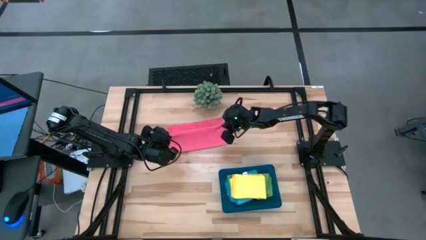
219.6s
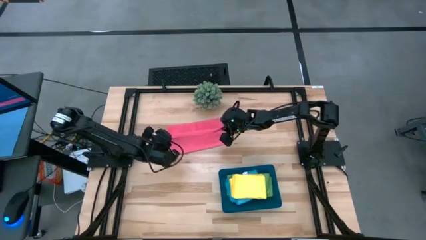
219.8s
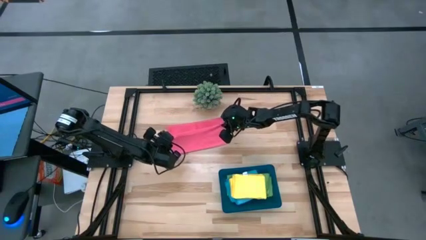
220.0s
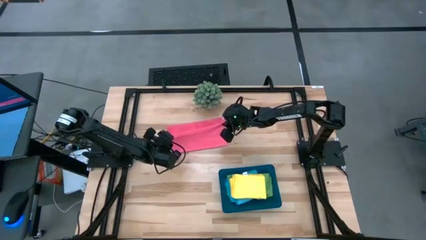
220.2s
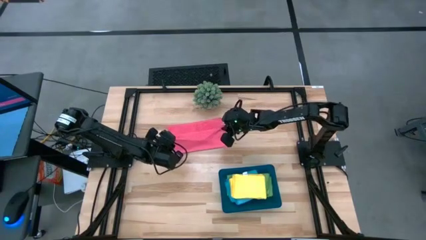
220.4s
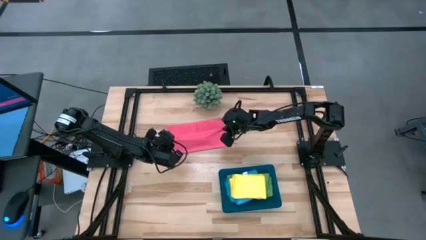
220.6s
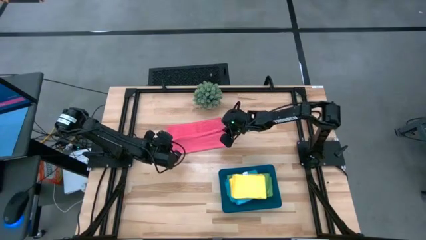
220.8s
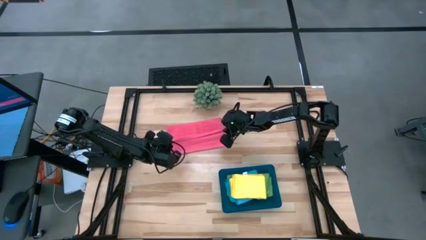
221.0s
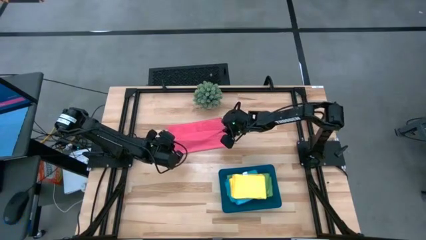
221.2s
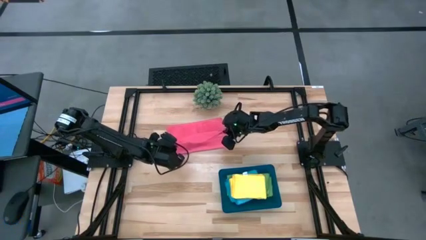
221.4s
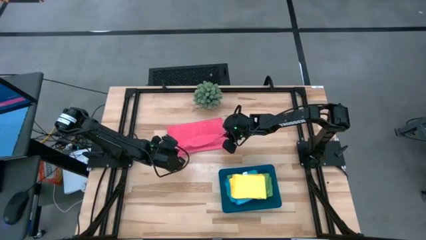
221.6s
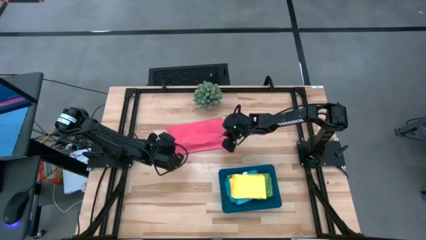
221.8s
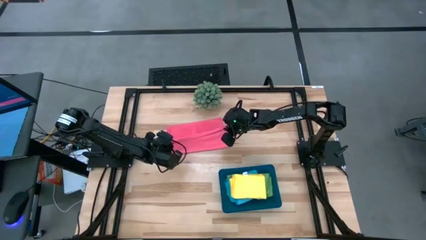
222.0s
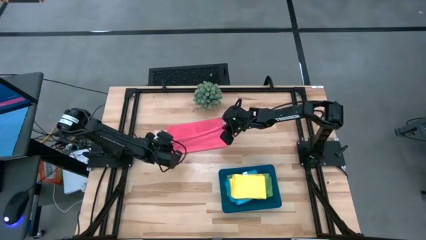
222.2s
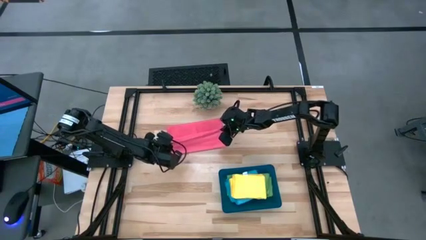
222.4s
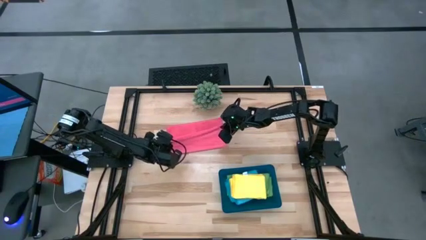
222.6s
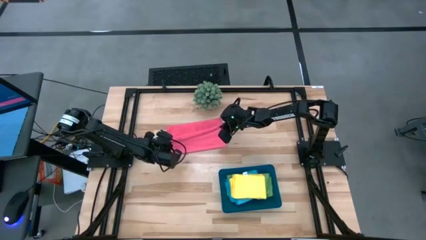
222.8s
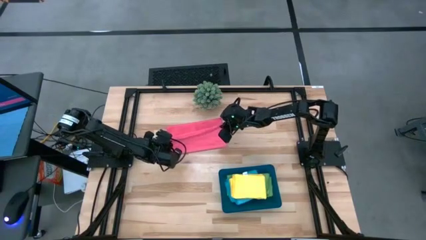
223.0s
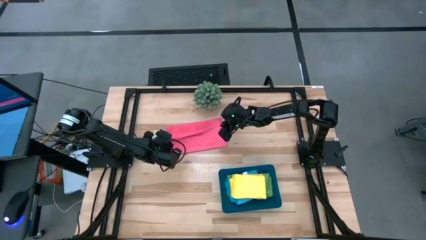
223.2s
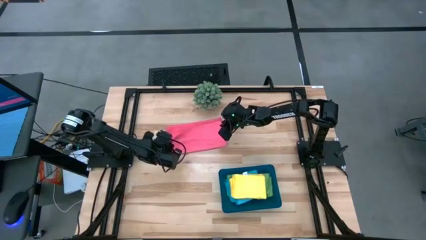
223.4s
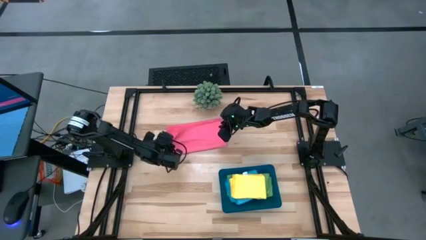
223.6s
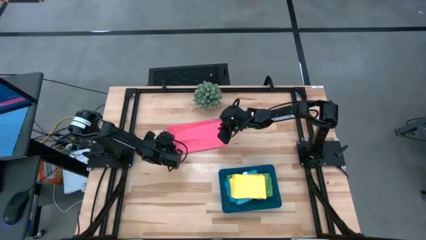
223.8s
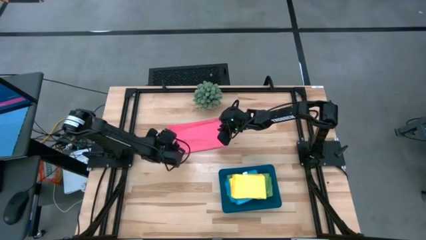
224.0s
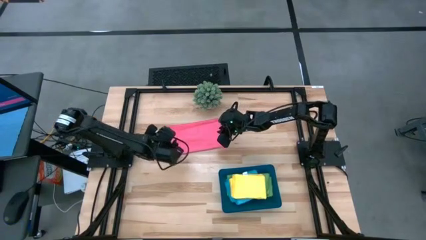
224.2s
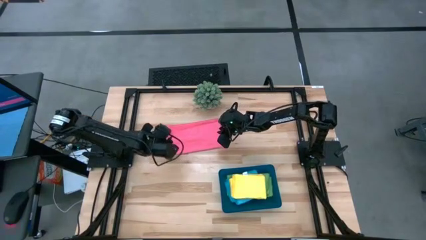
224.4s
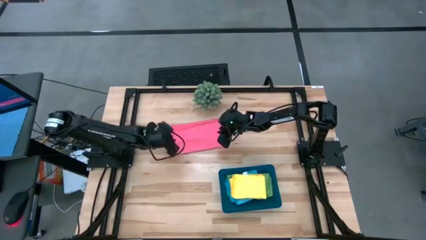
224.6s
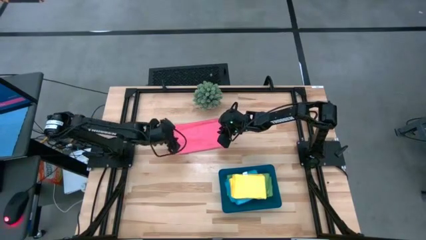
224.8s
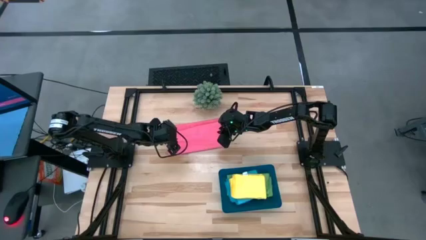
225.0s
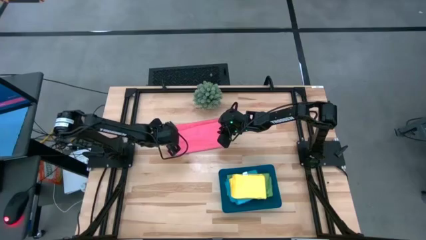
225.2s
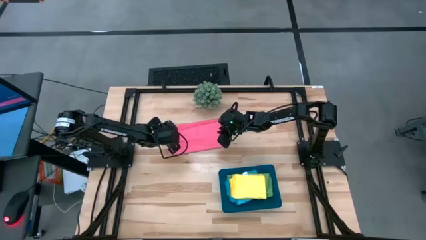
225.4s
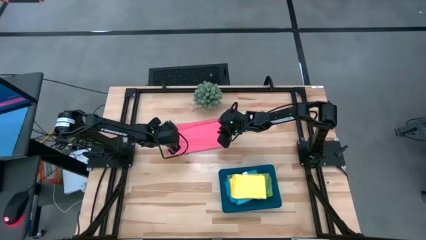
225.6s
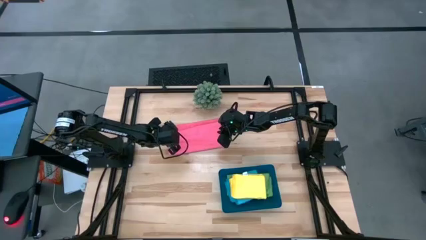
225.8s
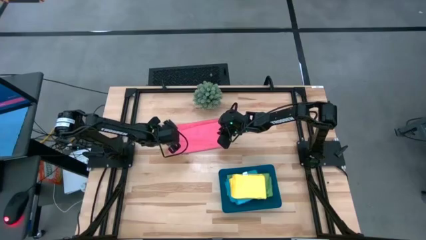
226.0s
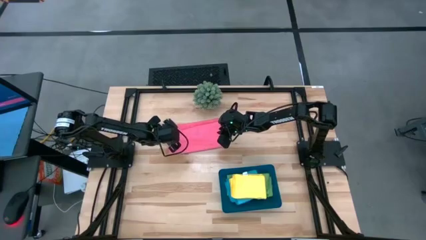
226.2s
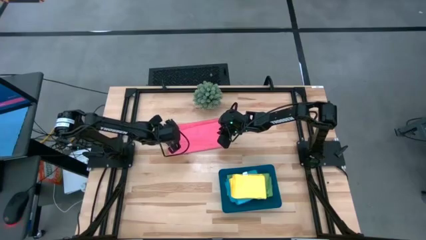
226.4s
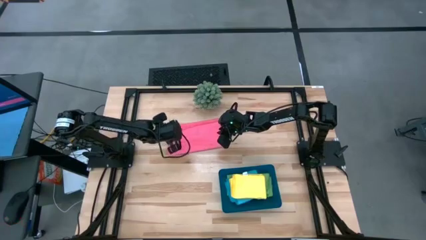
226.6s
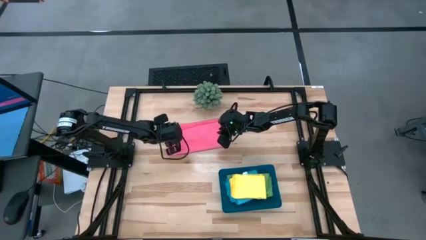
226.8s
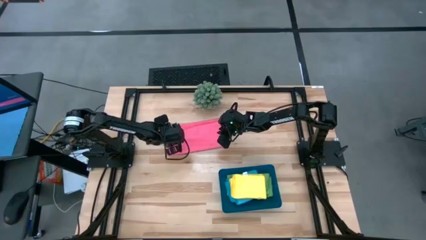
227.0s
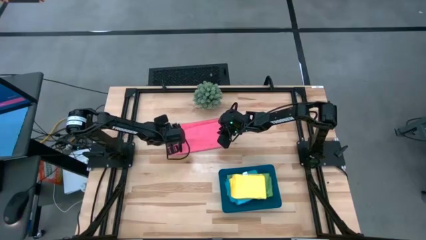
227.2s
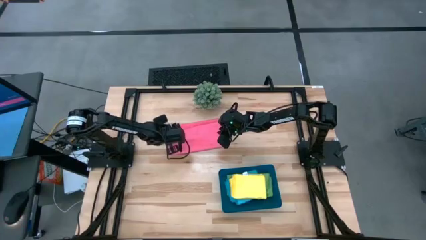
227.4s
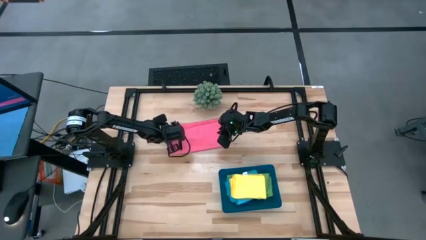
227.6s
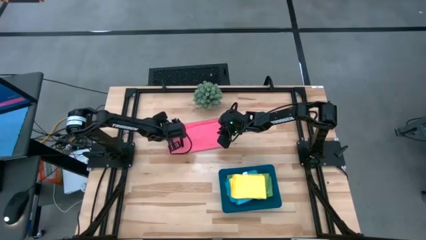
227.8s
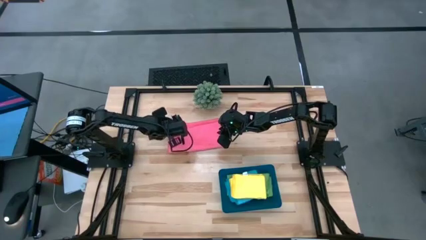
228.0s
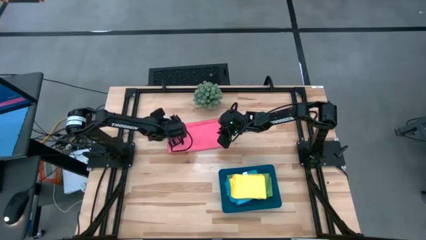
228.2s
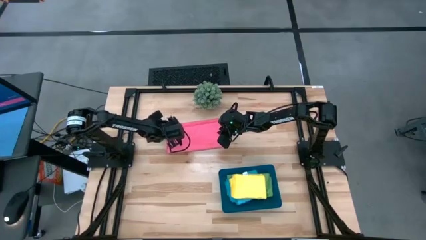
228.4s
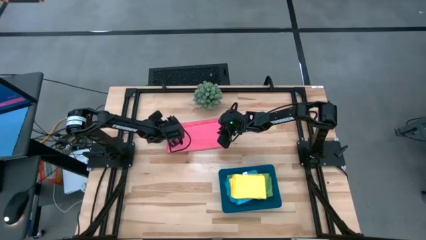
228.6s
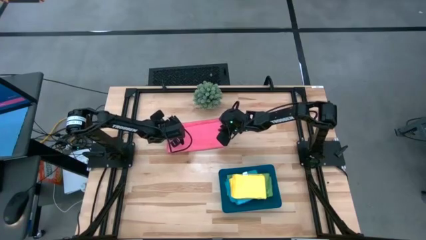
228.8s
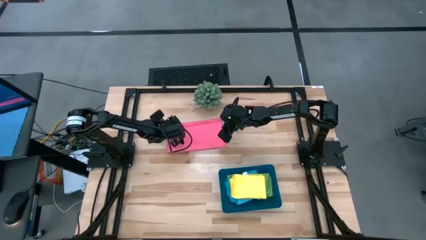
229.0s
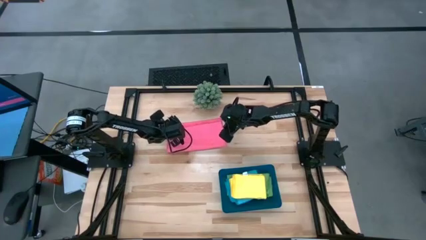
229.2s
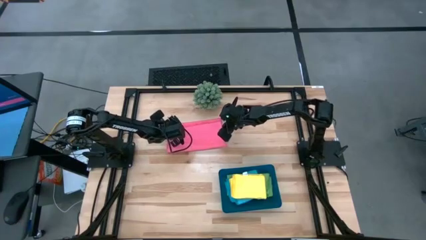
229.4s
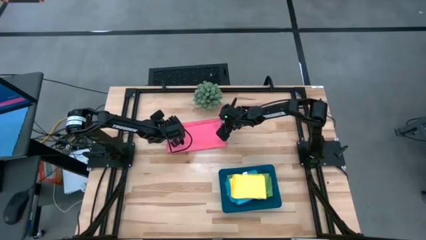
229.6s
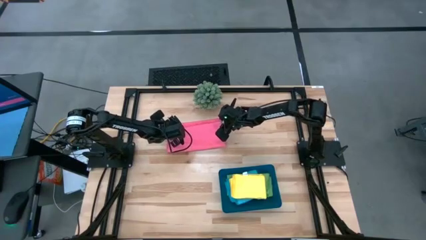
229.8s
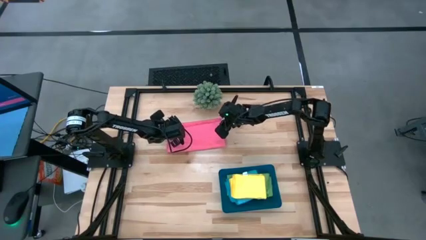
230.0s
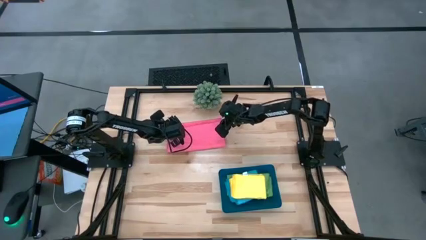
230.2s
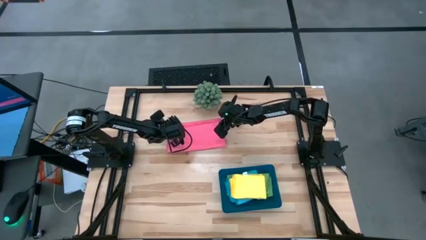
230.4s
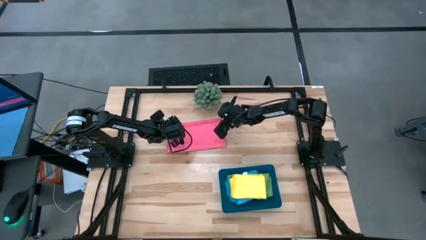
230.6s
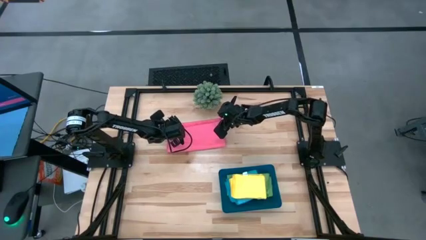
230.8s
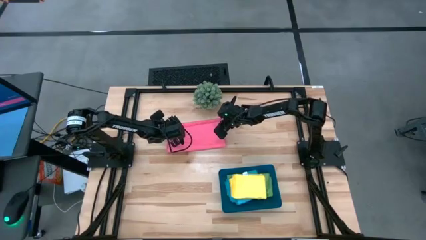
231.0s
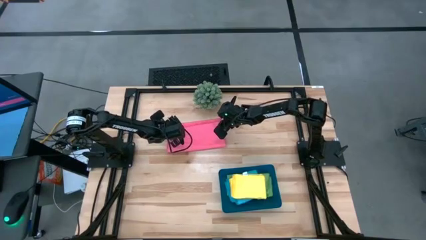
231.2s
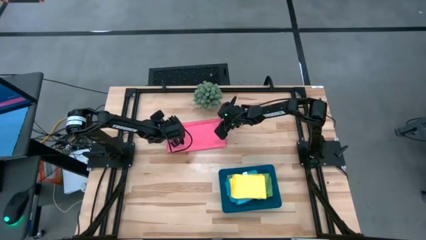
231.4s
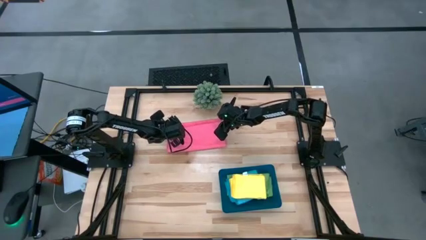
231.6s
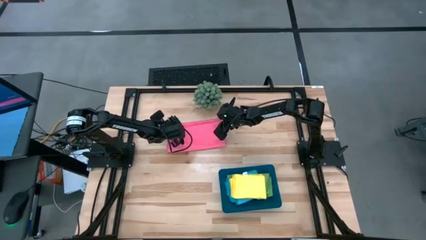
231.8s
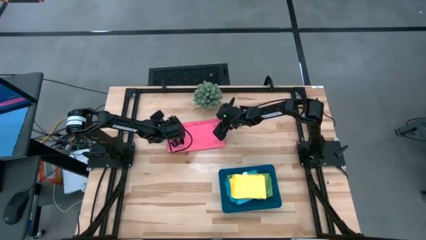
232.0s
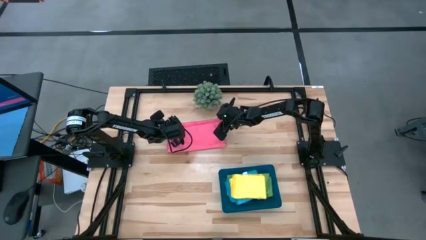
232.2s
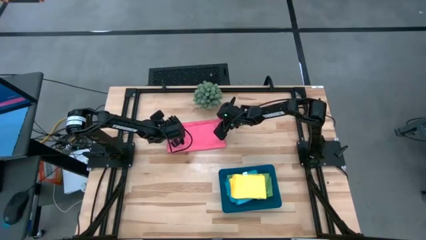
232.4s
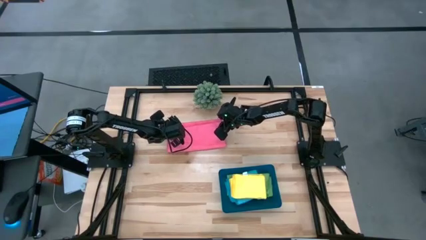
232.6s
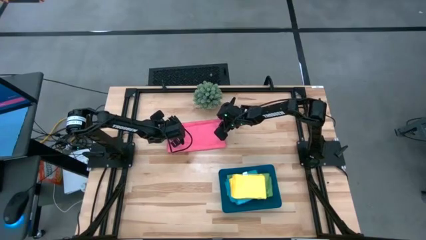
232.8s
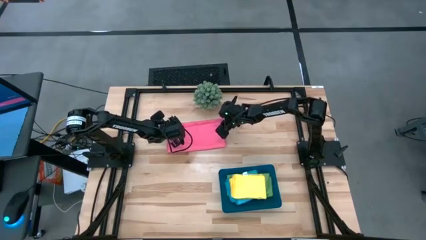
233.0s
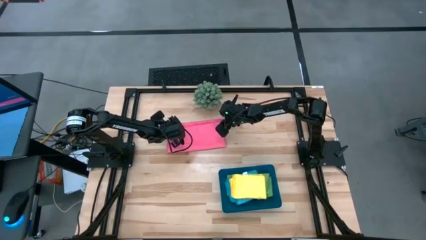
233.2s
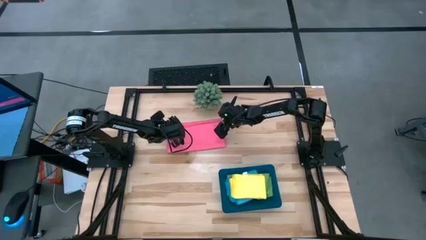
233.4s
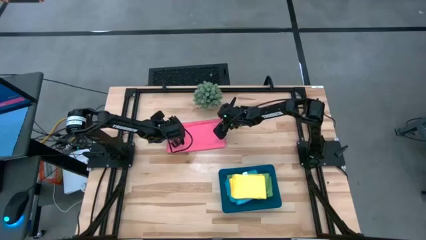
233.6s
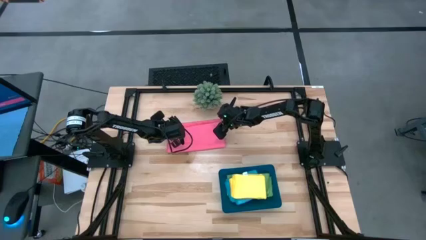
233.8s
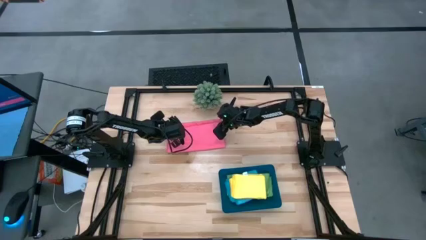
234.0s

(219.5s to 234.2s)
Task: Fold microfiber towels
Fold the pink microfiber towel

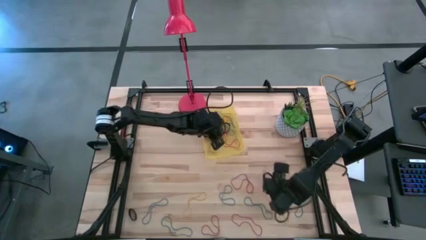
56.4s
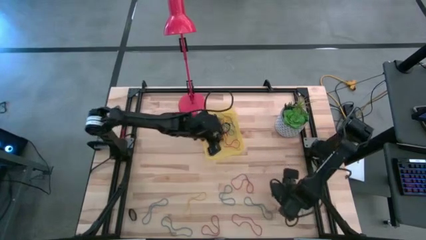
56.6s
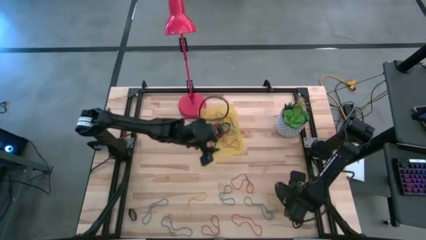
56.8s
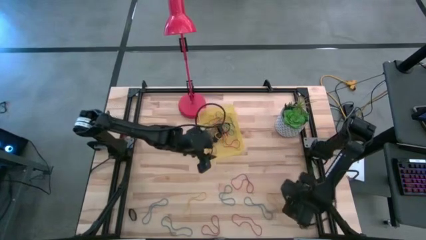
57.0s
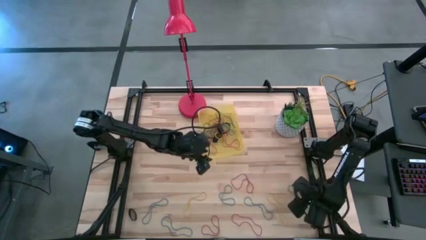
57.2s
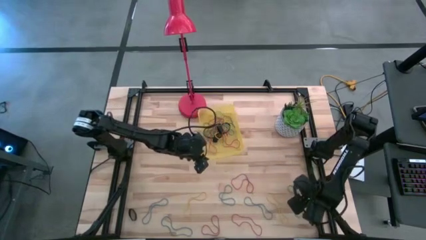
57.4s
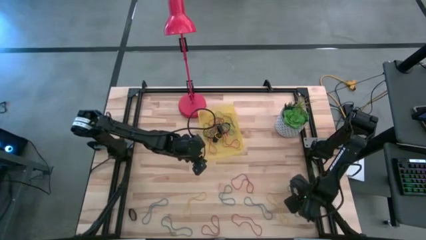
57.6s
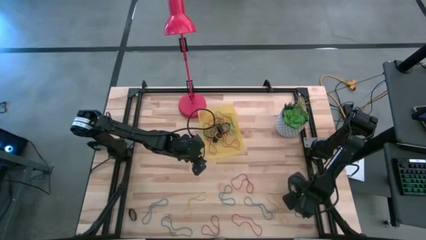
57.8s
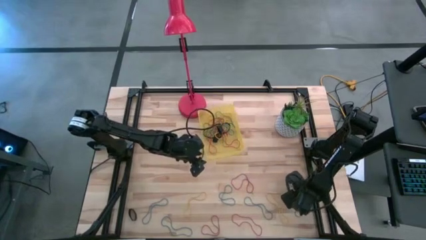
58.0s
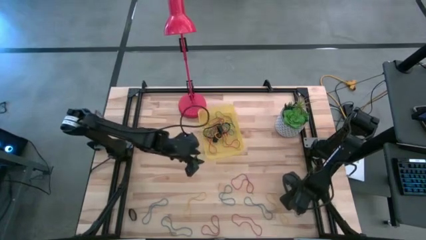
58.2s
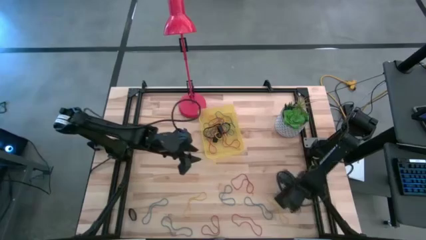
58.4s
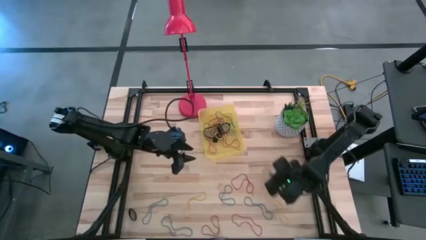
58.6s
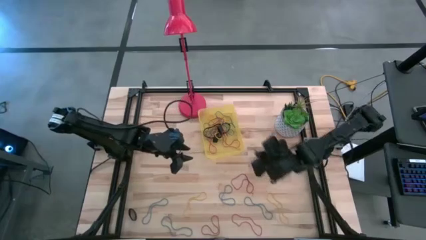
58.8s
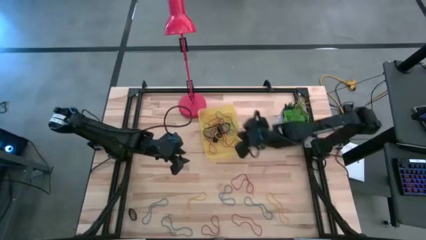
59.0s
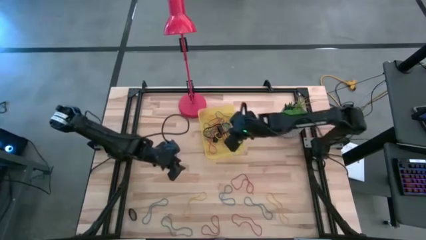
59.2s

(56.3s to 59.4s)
Task: Pick and place rubber bands into bin
Put the blue rubber band into the yellow bin

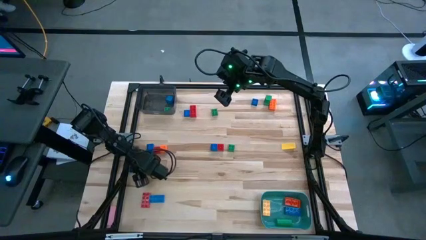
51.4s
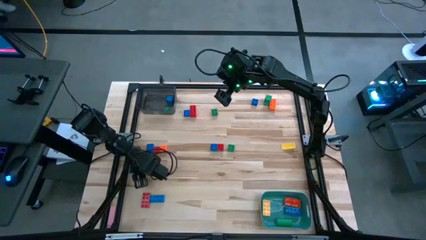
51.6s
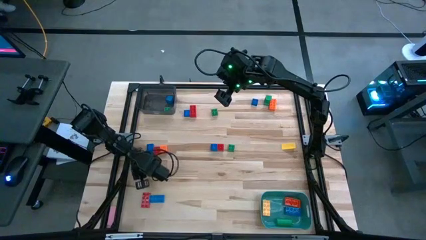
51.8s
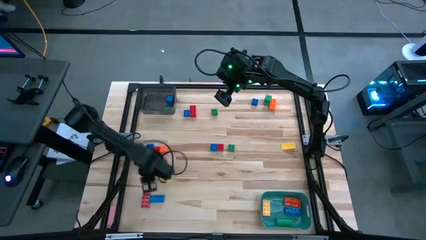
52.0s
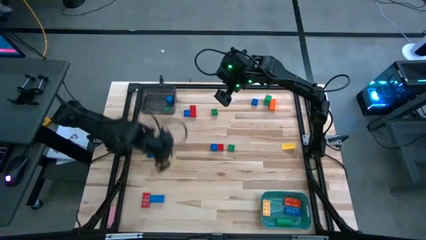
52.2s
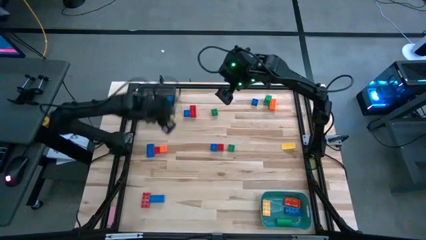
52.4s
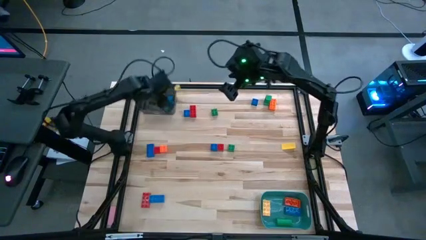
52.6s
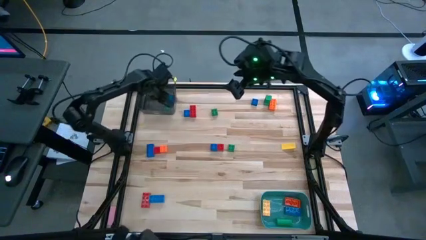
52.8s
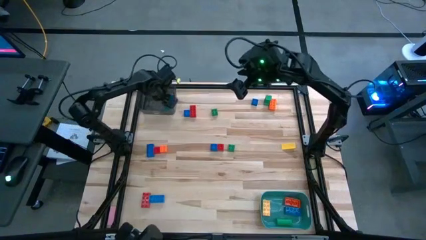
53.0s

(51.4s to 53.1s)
Task: Sort blocks by size
Put the middle left blue game piece into the black bin
